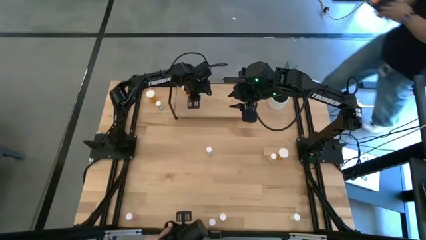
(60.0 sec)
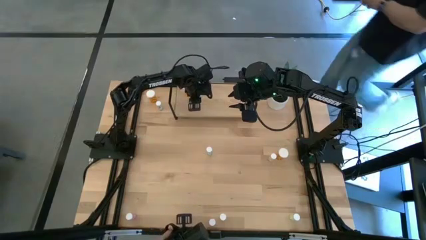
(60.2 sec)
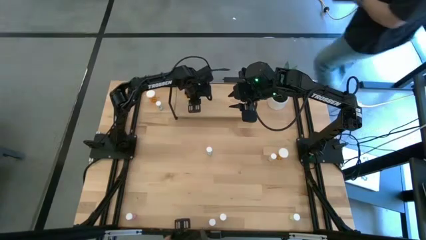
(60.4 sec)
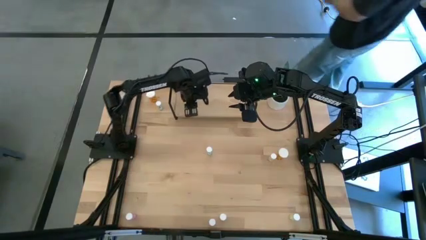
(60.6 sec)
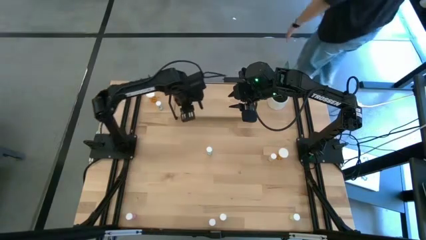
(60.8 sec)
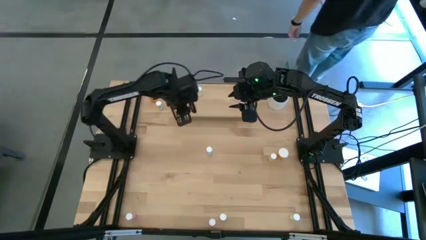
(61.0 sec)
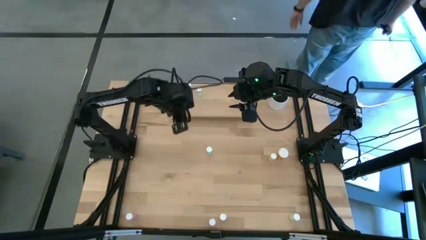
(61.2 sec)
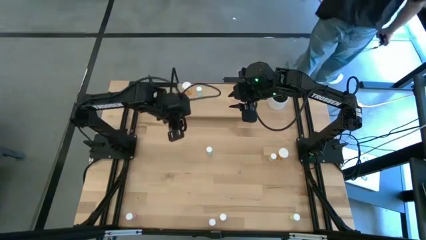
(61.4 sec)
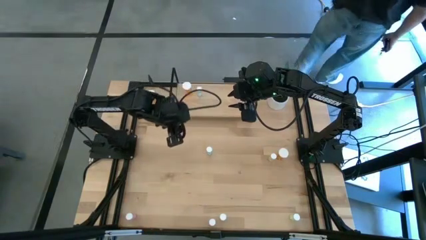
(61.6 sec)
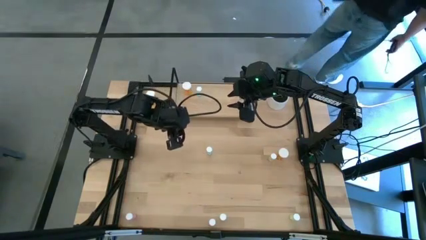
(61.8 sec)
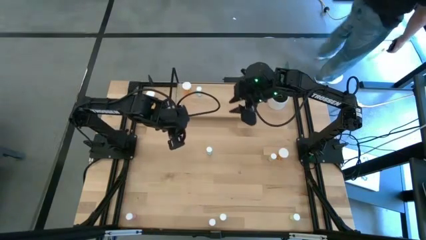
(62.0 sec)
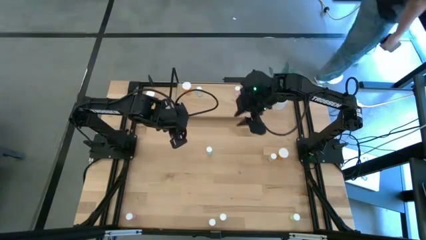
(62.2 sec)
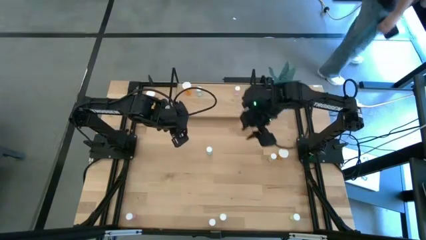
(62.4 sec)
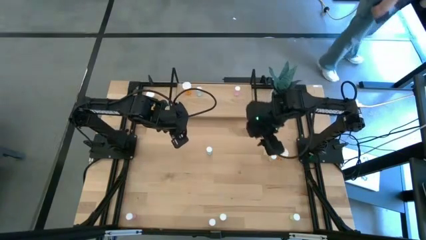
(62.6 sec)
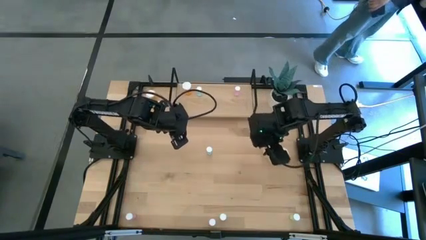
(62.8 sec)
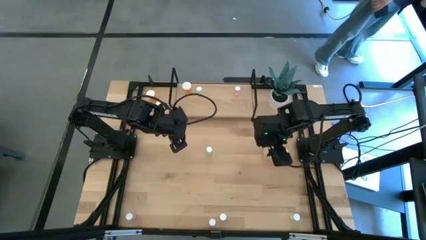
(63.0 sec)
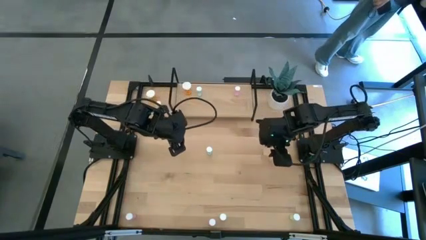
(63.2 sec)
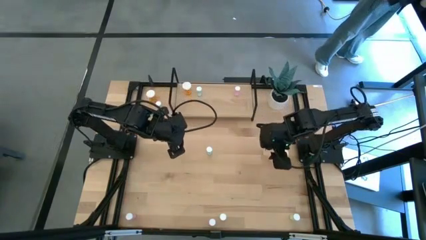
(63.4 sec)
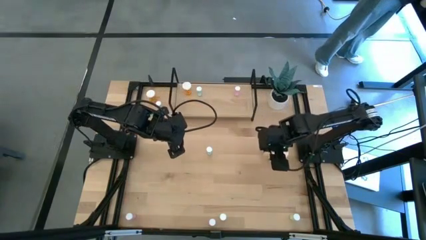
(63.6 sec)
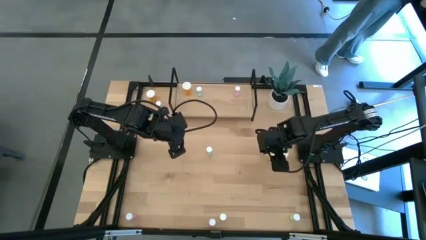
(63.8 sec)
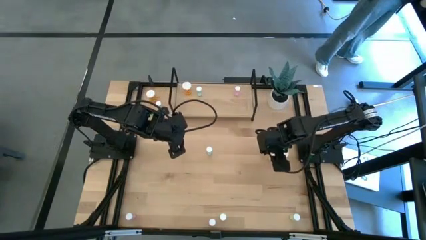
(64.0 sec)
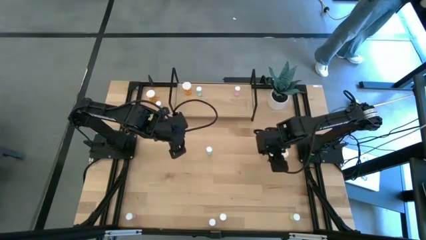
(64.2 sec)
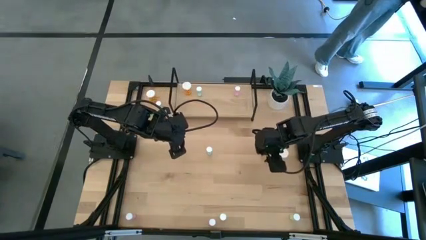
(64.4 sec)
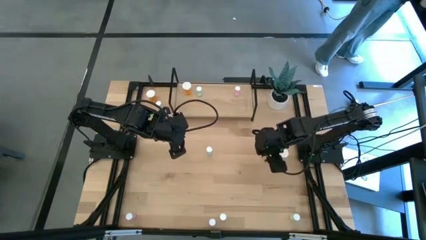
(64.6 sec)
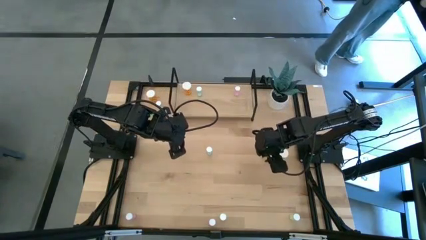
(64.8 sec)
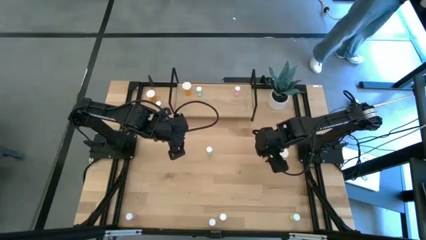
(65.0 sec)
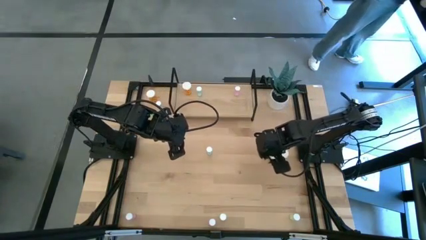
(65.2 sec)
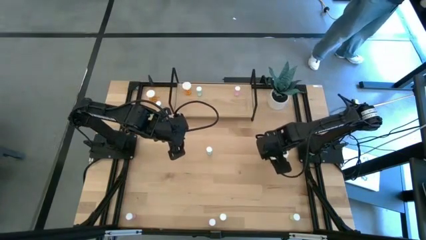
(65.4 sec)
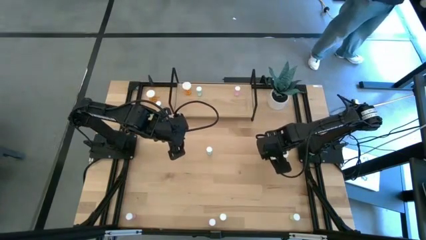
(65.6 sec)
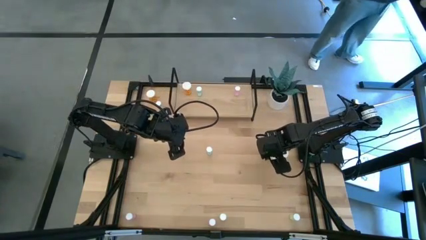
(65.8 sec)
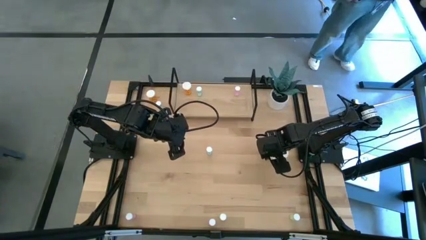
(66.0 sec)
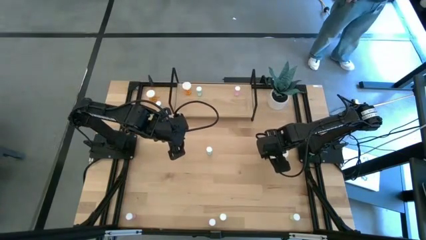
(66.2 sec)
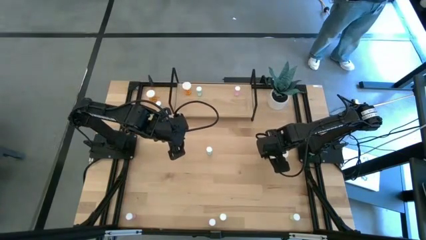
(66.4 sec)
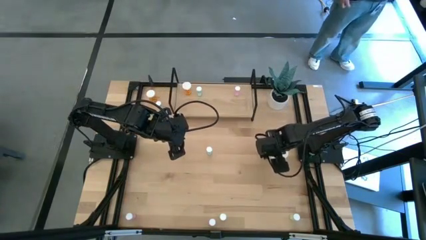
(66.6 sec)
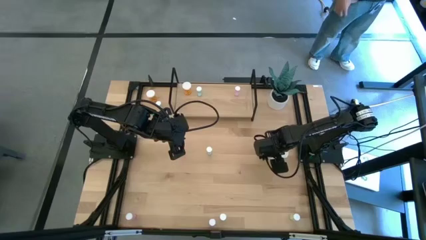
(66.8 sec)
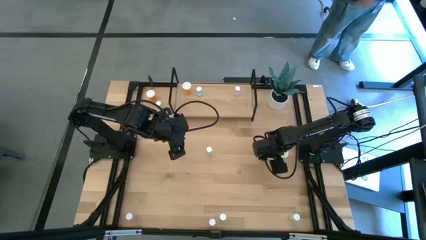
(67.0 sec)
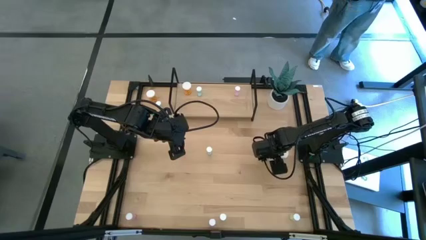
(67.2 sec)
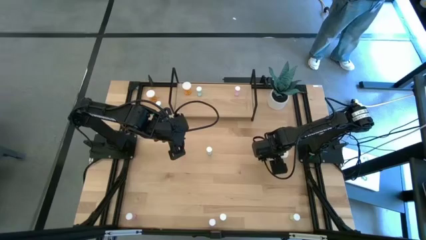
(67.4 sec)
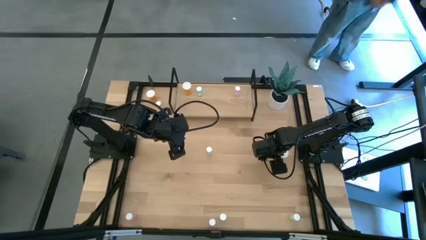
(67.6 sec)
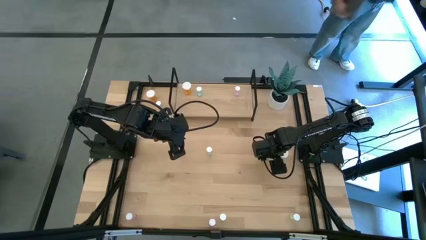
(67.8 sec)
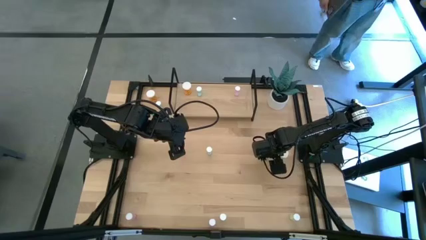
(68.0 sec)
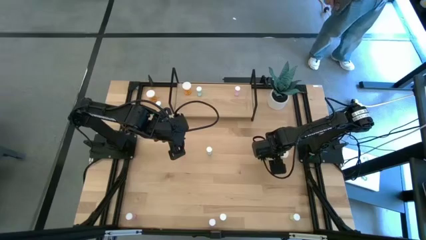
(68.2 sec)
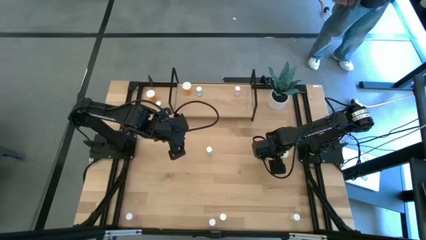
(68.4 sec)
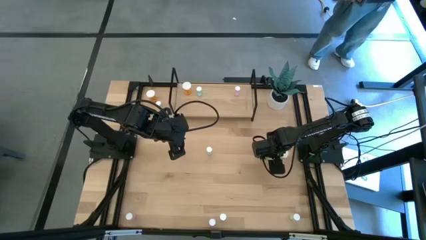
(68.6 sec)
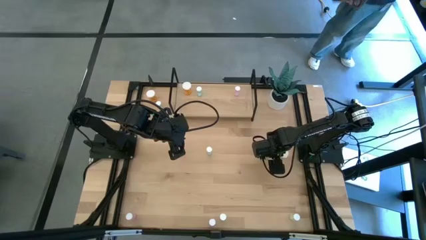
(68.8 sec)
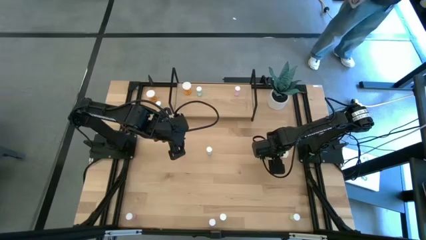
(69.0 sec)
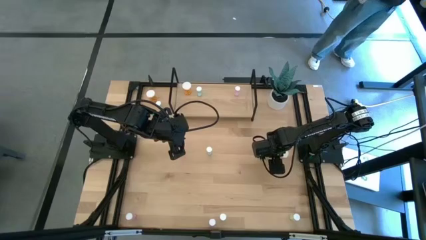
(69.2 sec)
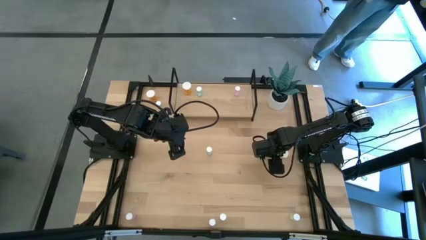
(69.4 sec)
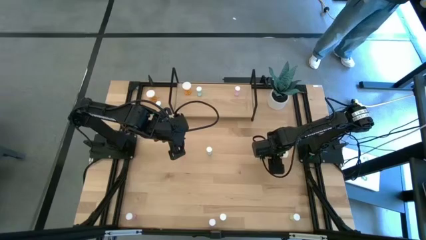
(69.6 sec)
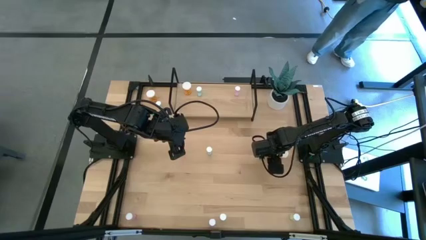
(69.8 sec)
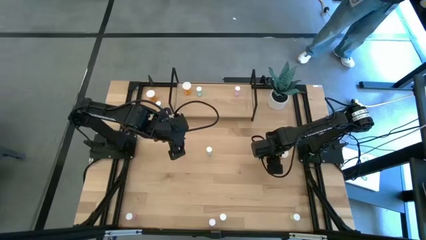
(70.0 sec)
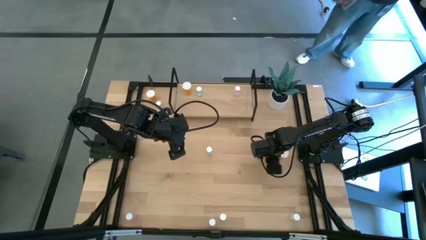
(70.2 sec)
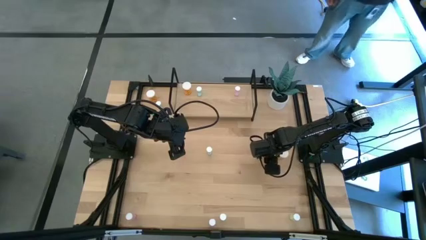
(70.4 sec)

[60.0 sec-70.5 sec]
Task: Pick and place medicine bottles onto shelf by color
Put the top yellow pill bottle on the shelf
